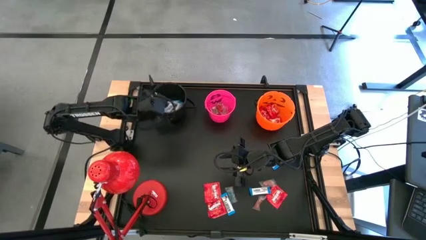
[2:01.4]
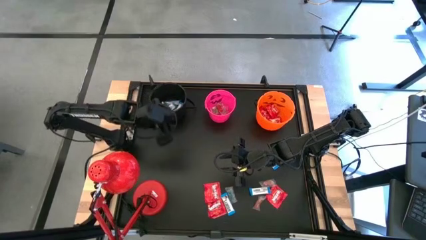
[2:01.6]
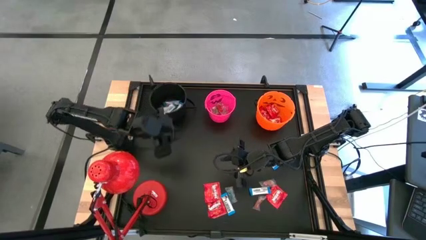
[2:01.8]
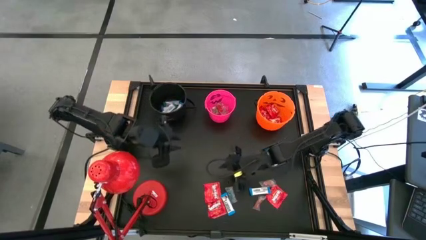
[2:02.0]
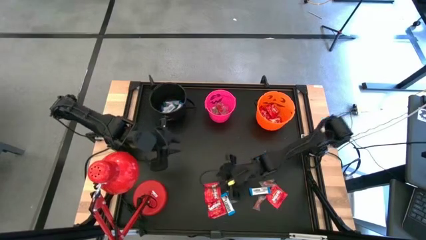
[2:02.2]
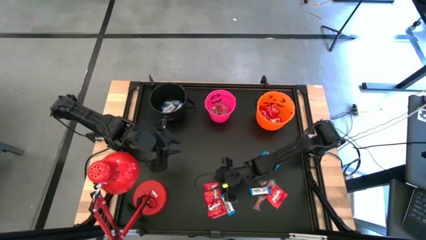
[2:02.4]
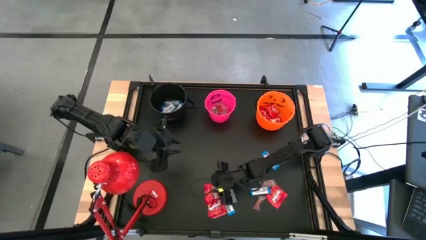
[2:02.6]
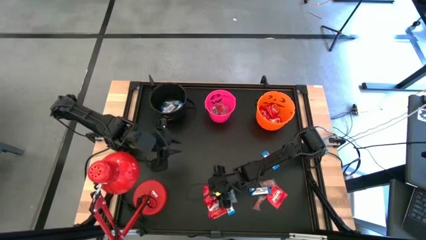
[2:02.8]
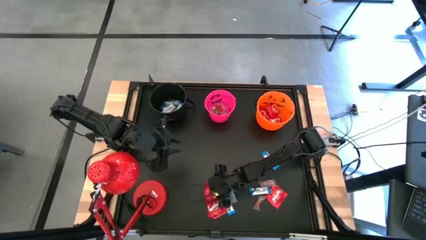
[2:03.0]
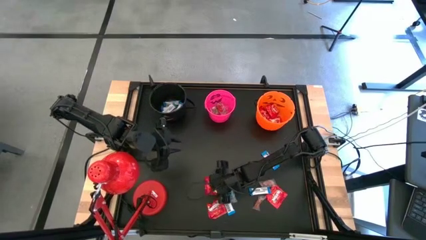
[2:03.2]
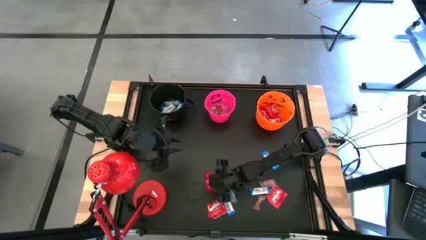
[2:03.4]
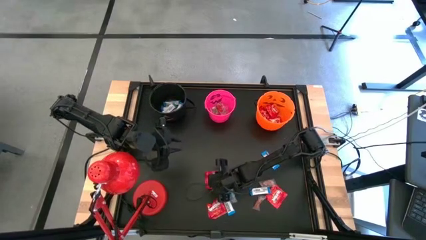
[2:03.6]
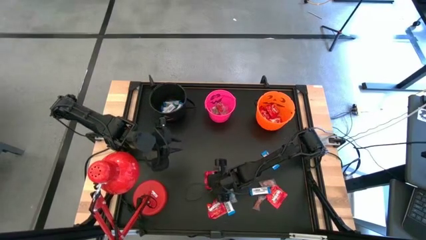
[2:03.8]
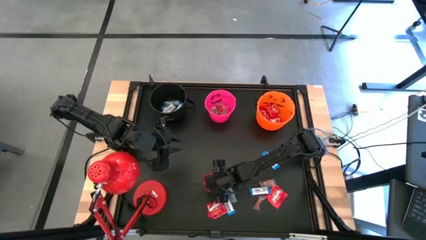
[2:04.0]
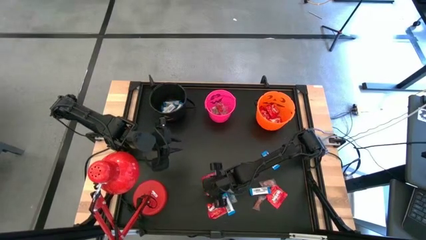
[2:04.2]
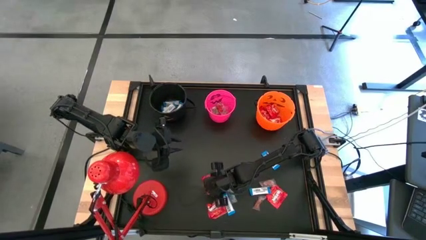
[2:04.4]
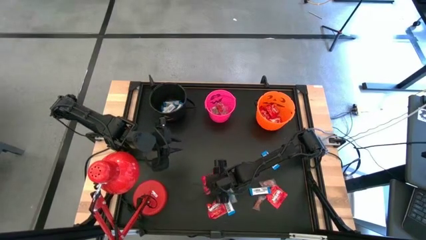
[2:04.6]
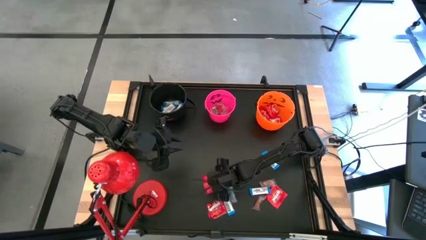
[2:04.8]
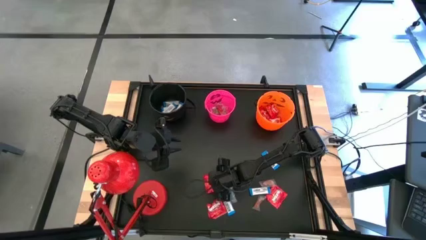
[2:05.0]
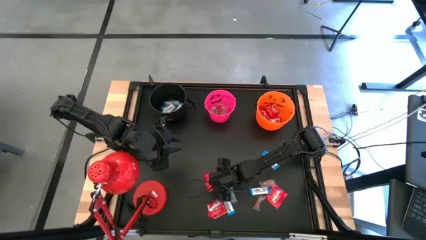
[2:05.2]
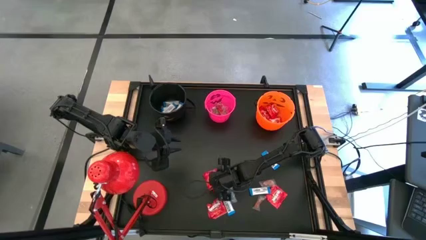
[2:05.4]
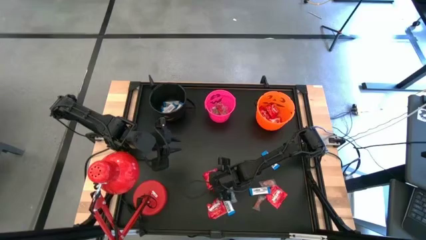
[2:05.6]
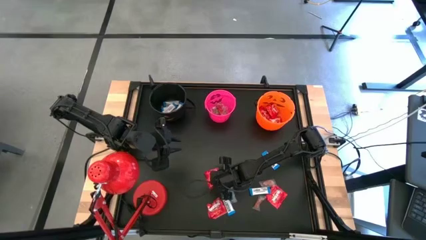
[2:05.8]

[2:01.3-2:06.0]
Task: Organize candy in baskets
Put the red candy into the orange bucket

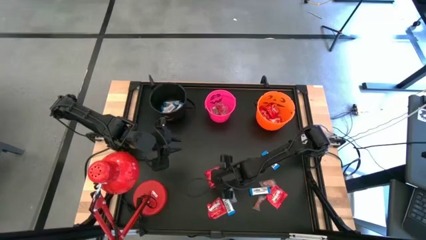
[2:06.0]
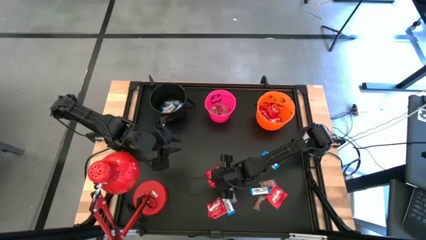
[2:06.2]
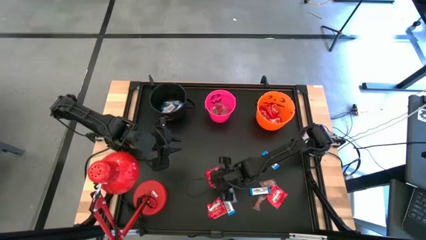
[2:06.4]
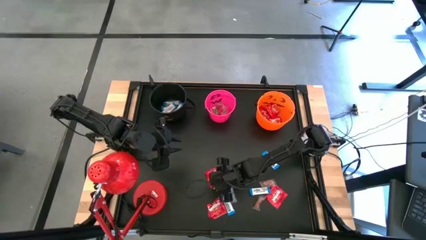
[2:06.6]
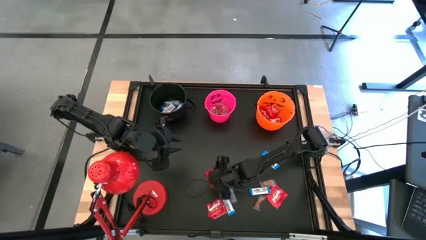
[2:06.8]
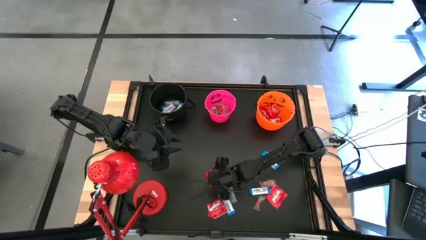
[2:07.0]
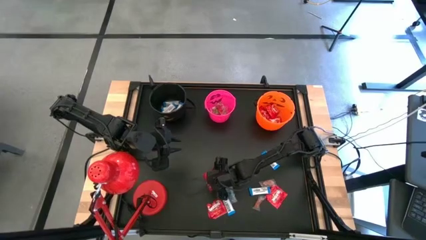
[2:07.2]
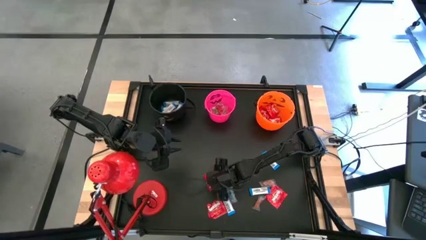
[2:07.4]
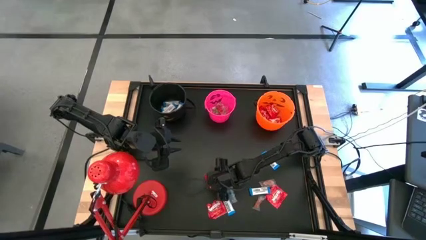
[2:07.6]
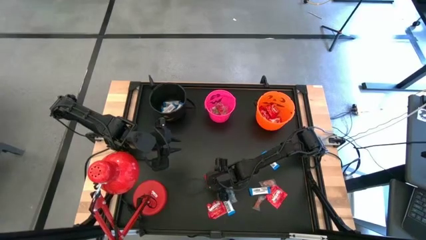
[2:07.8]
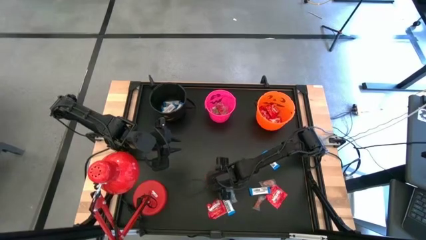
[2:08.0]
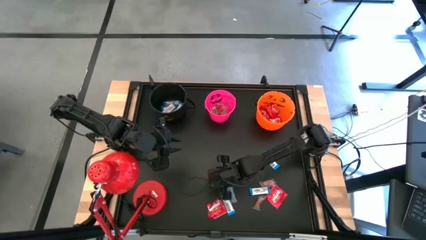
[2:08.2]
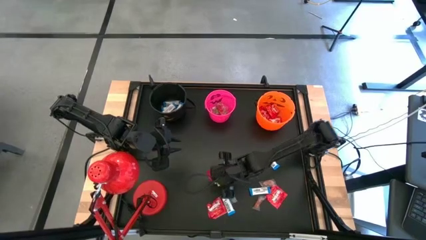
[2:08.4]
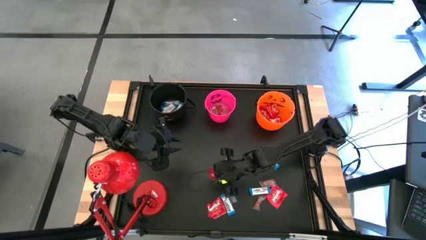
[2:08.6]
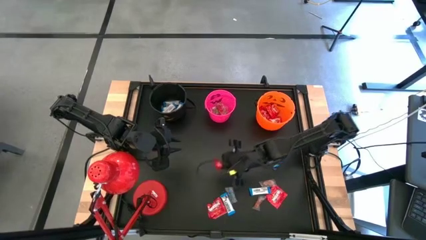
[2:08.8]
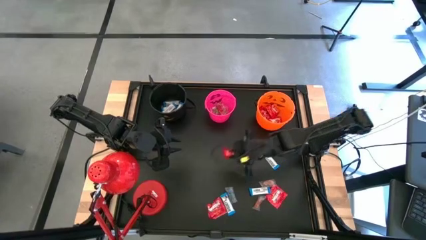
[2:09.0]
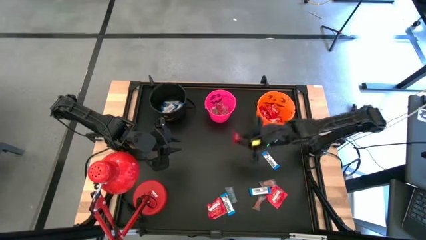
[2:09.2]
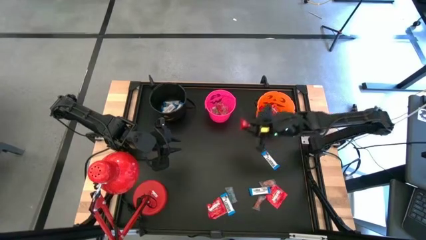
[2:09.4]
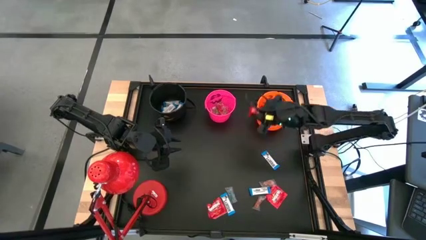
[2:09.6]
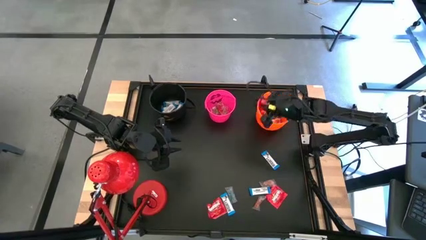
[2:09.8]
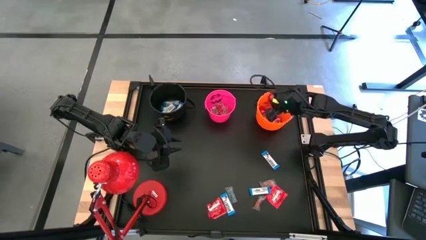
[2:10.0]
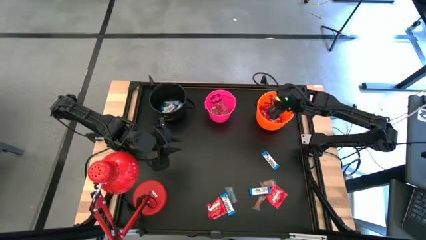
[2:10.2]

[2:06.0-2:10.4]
Put the red candy into the orange bucket

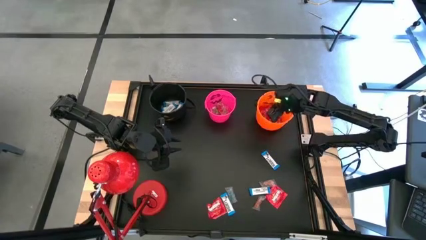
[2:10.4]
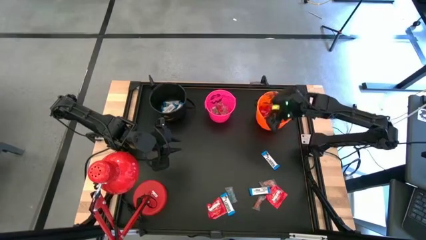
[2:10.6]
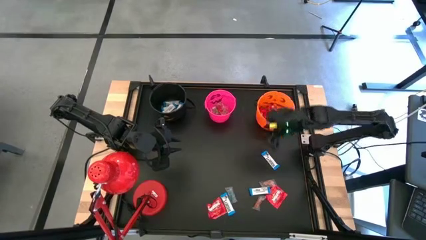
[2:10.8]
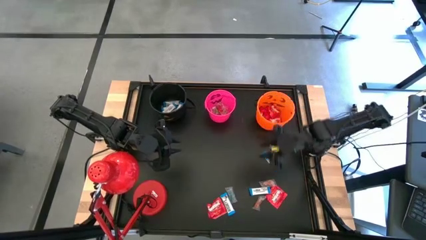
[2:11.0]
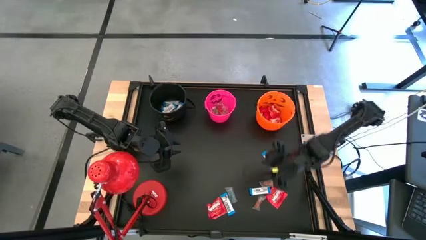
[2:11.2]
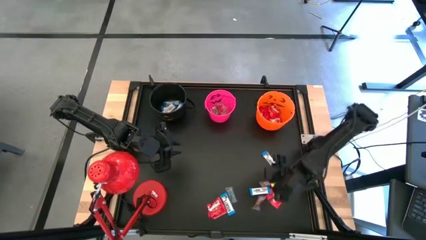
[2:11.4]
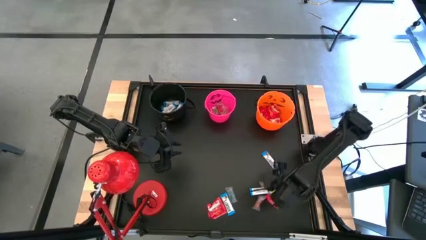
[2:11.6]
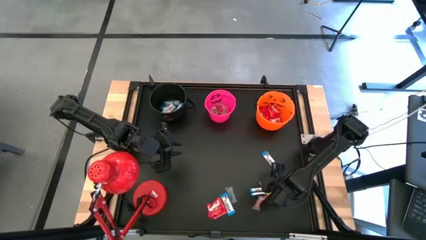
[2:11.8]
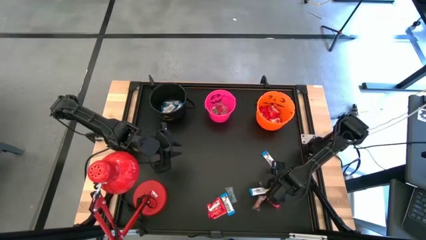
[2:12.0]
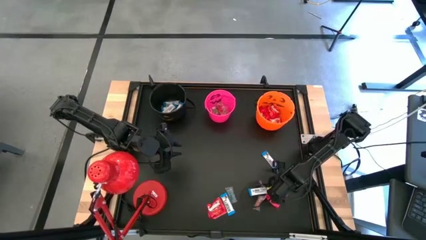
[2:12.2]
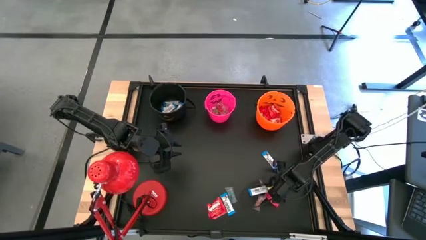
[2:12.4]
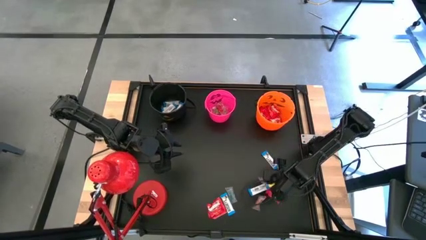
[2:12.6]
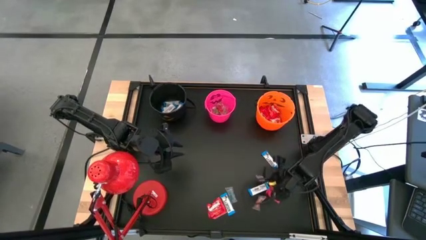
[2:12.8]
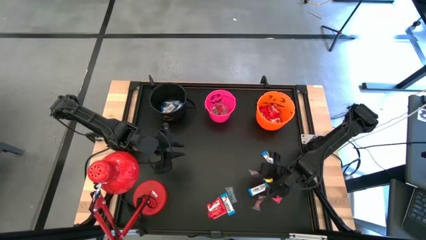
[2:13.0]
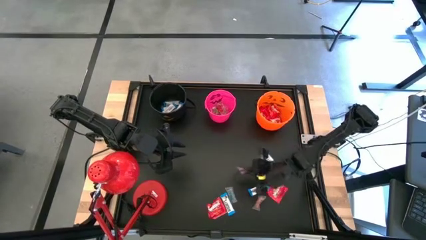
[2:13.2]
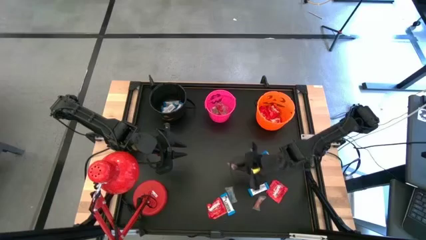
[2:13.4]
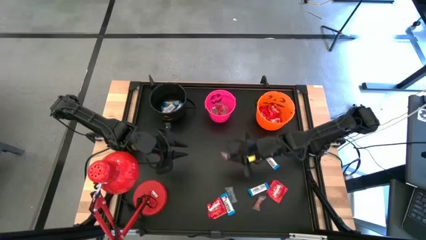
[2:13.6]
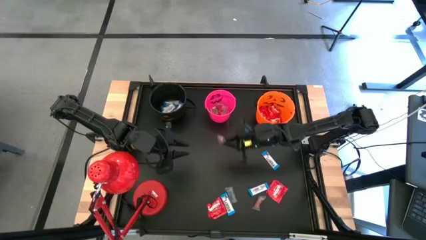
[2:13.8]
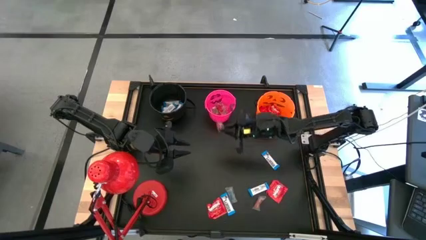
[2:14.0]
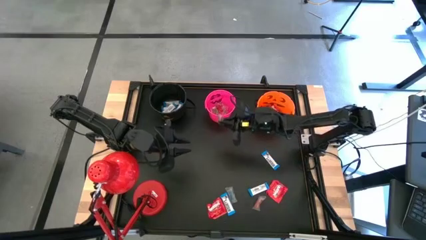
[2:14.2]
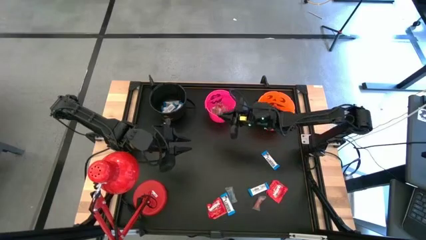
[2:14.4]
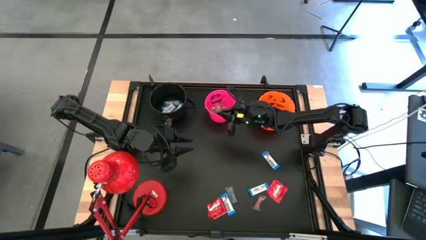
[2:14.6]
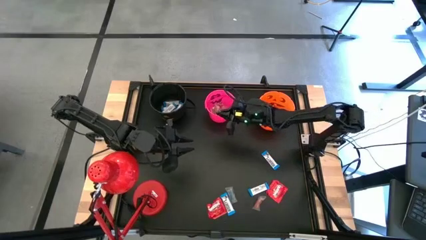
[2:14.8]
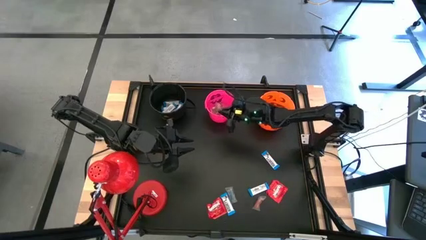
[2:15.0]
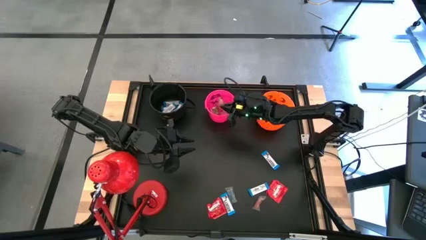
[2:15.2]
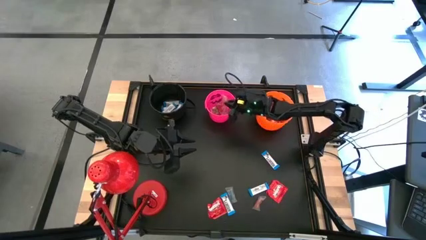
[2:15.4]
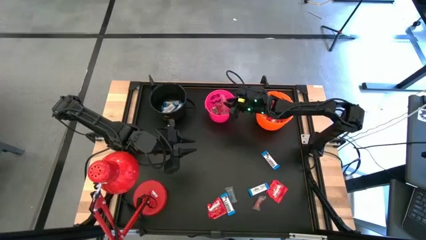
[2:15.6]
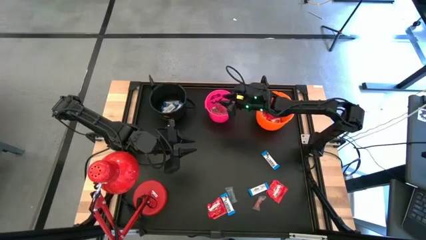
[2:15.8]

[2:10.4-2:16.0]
Put the transparent candy into the pink bucket

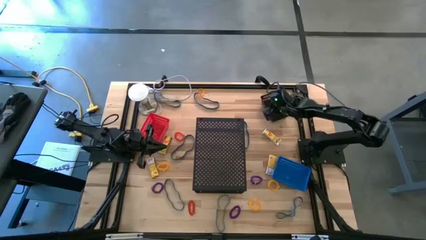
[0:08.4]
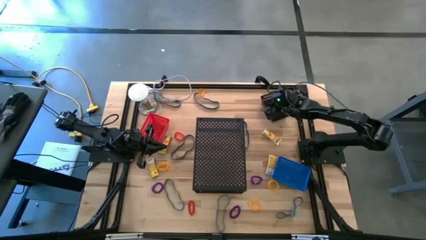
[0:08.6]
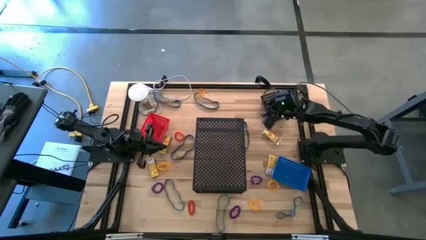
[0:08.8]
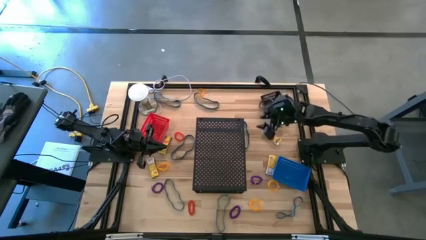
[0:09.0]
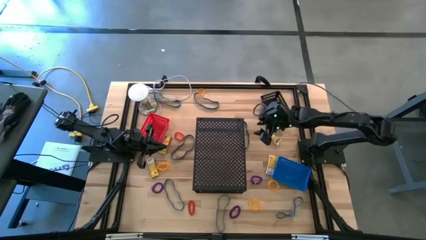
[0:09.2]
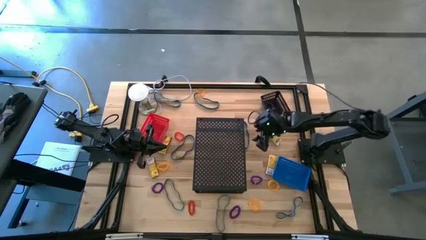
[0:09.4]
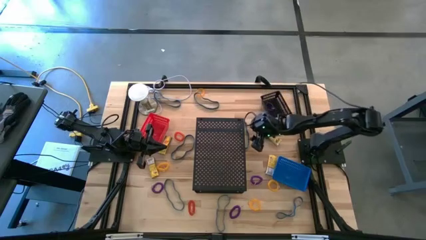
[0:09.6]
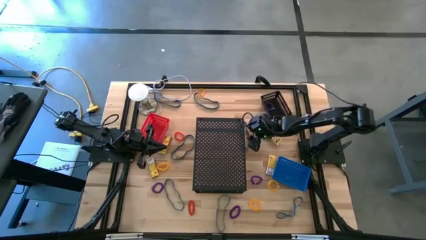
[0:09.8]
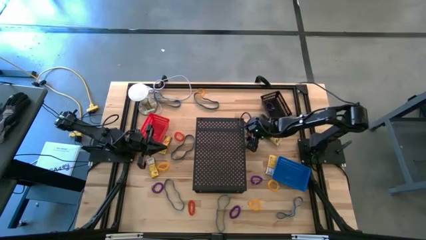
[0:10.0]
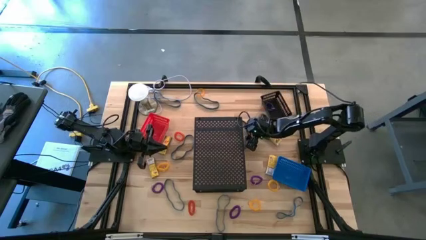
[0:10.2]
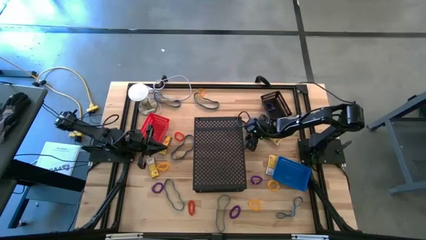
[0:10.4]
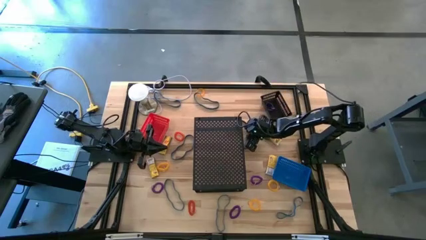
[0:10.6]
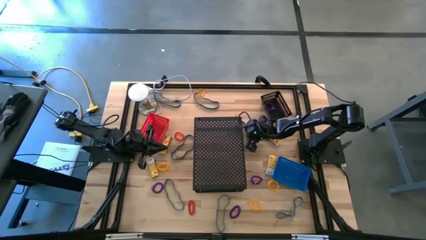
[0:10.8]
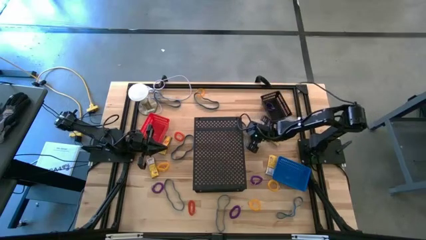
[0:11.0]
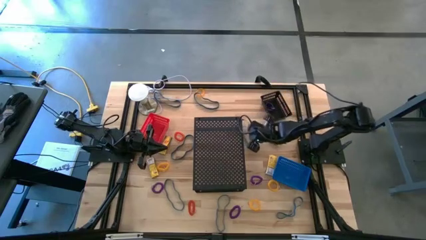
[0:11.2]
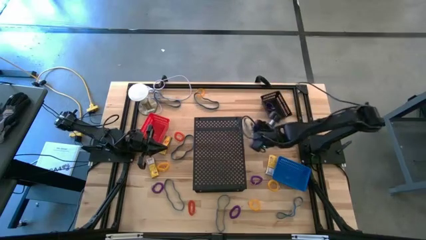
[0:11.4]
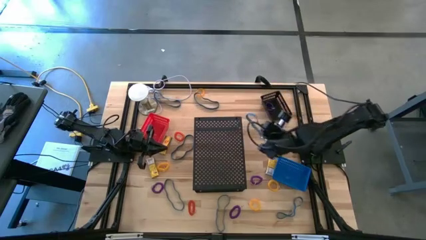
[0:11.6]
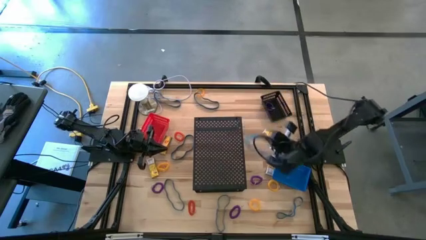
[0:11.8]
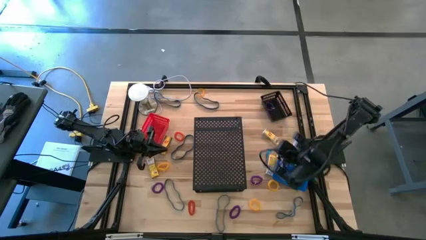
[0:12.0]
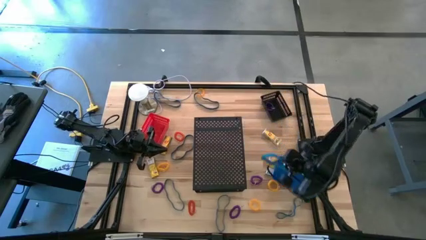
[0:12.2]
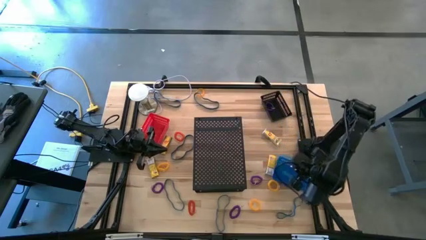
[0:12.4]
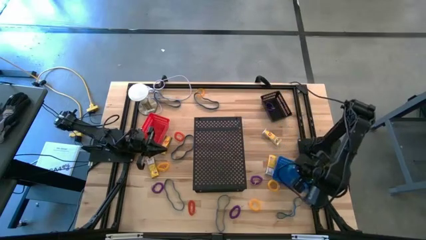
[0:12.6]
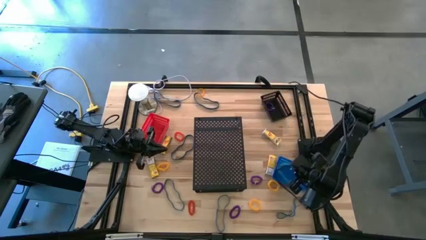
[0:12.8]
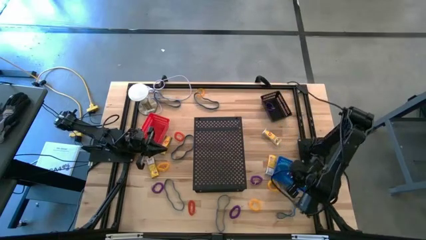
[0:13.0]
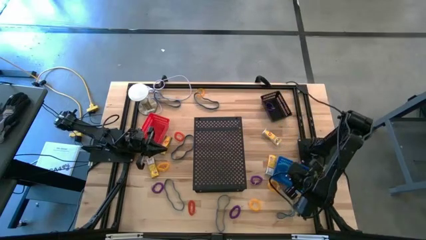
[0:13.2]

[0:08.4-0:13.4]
Task: Pick & Place Office Desk Supplies
Put the blue rubber band into the blue bin
